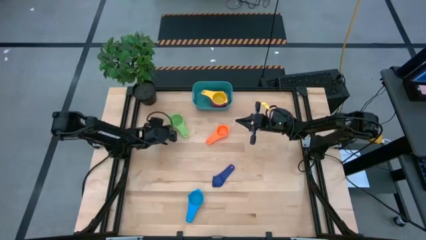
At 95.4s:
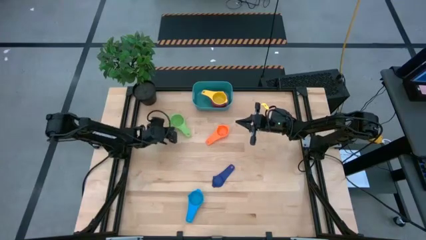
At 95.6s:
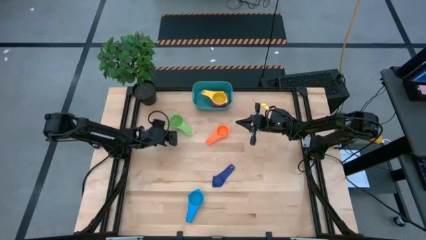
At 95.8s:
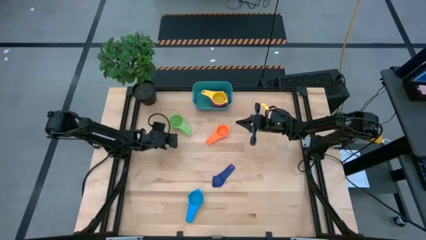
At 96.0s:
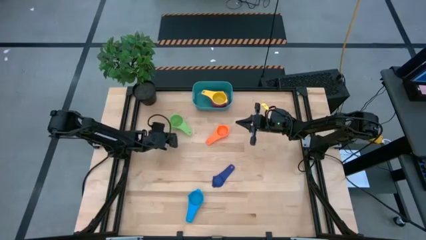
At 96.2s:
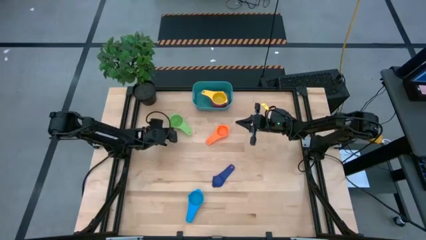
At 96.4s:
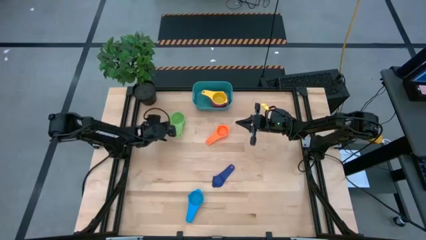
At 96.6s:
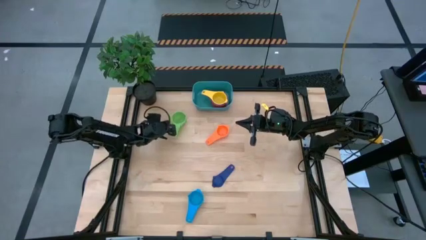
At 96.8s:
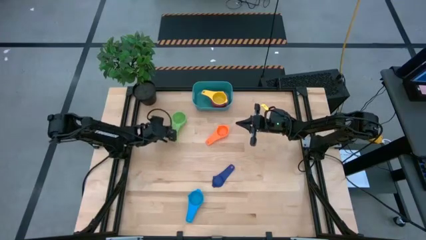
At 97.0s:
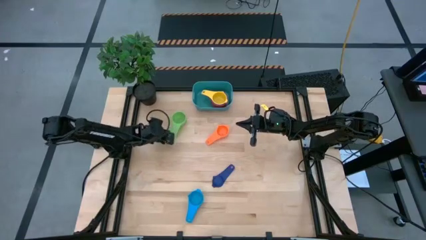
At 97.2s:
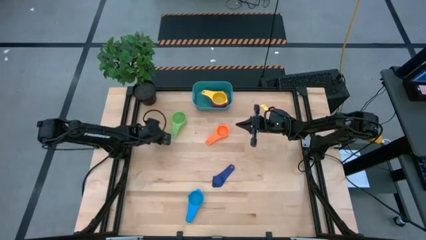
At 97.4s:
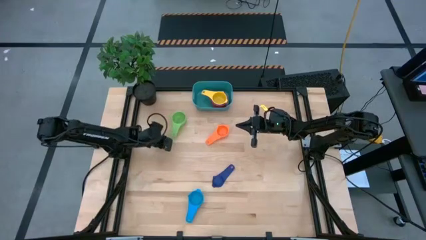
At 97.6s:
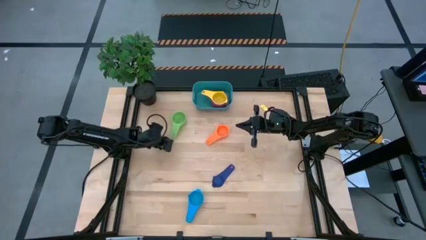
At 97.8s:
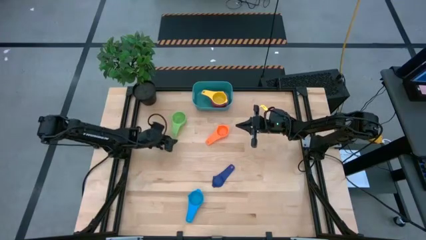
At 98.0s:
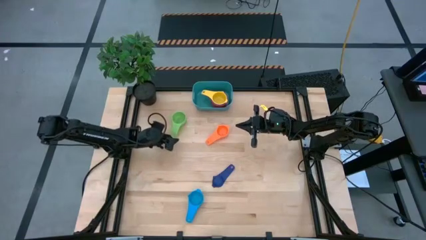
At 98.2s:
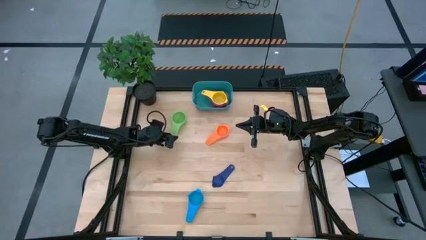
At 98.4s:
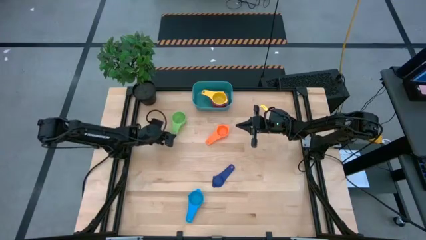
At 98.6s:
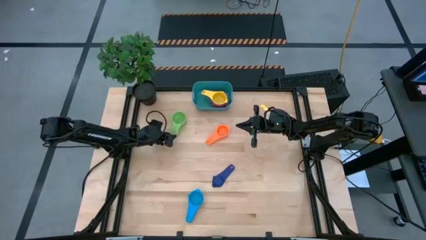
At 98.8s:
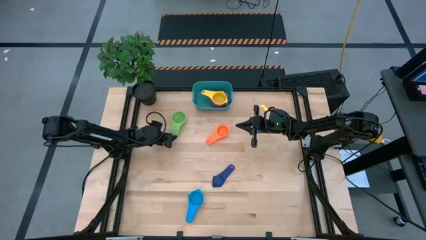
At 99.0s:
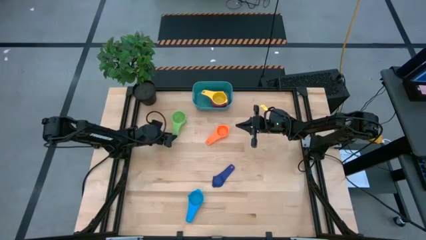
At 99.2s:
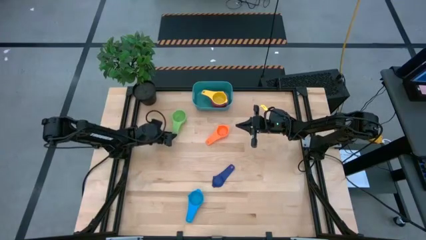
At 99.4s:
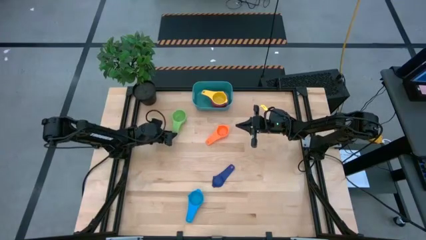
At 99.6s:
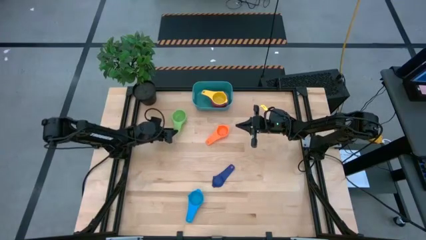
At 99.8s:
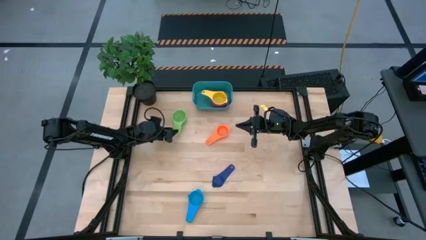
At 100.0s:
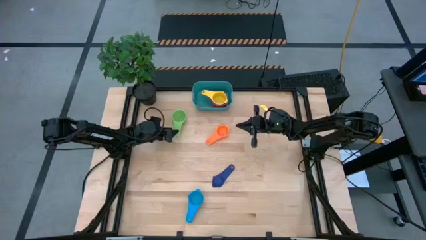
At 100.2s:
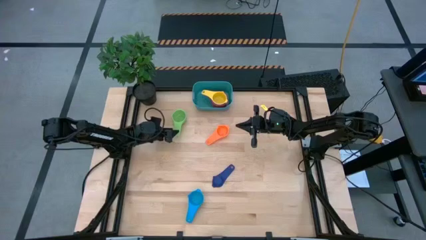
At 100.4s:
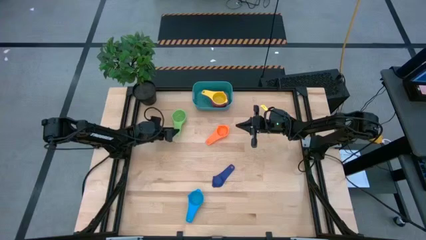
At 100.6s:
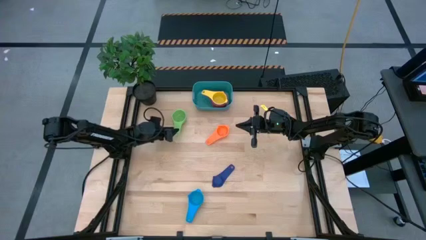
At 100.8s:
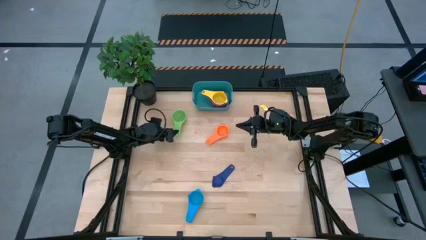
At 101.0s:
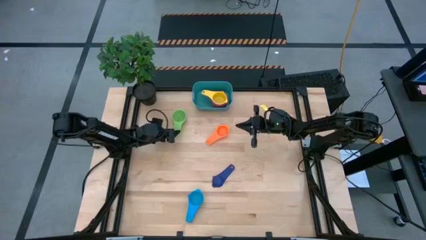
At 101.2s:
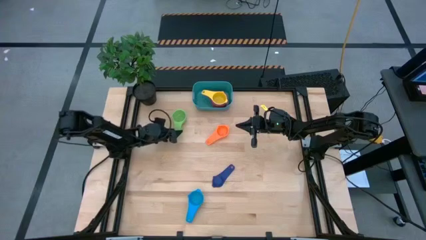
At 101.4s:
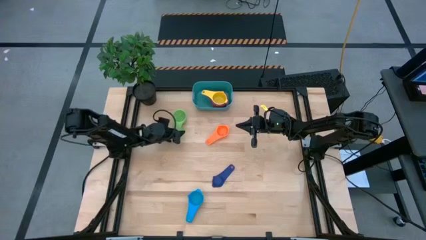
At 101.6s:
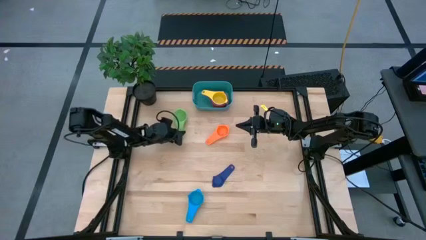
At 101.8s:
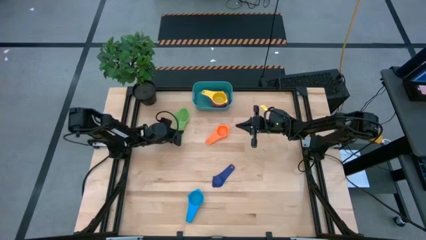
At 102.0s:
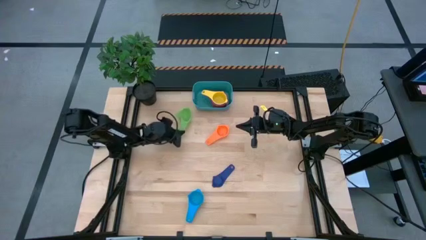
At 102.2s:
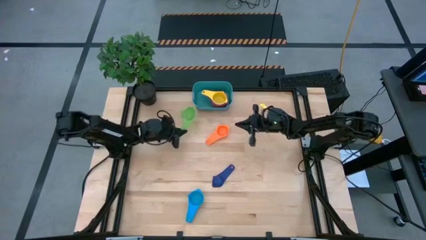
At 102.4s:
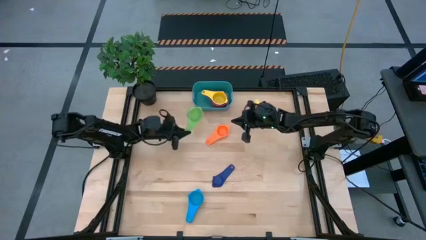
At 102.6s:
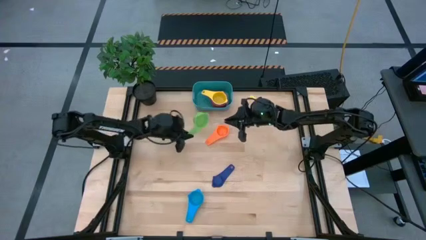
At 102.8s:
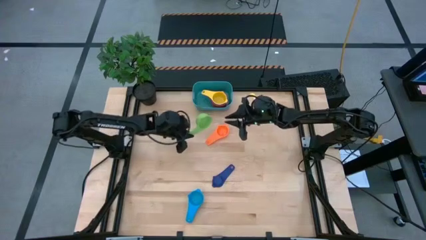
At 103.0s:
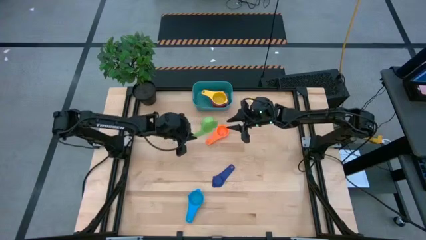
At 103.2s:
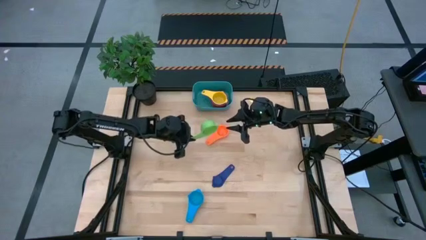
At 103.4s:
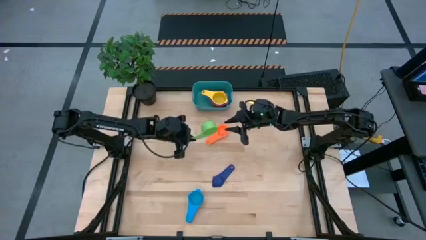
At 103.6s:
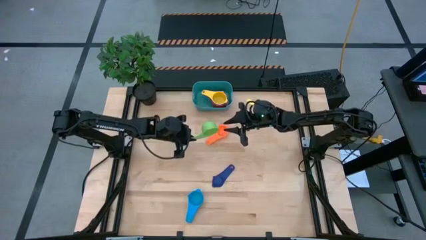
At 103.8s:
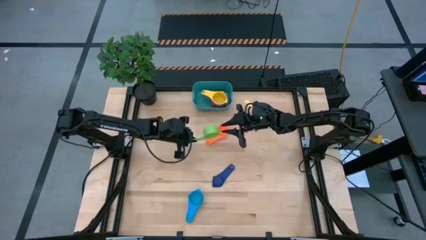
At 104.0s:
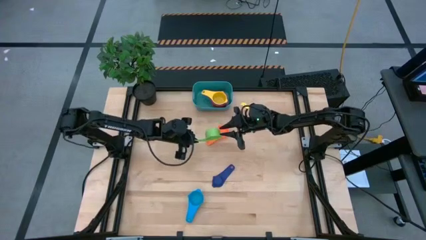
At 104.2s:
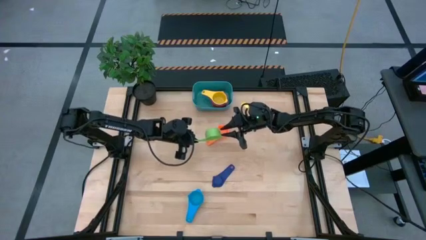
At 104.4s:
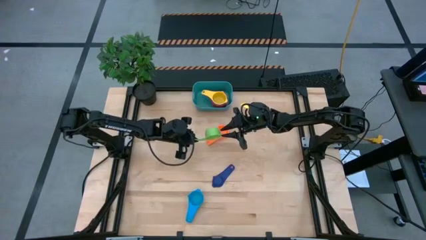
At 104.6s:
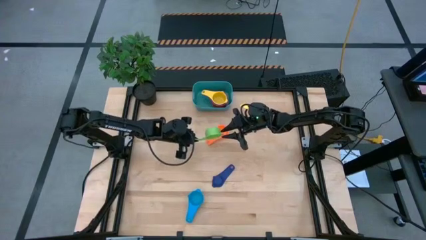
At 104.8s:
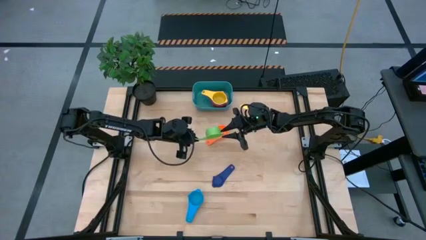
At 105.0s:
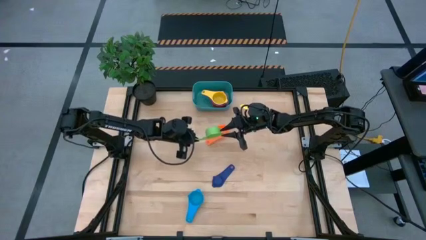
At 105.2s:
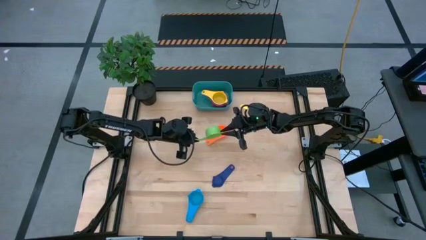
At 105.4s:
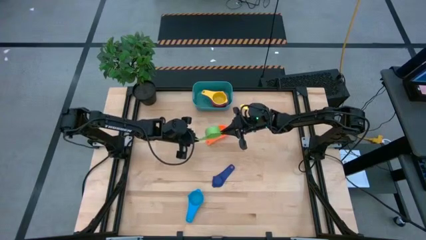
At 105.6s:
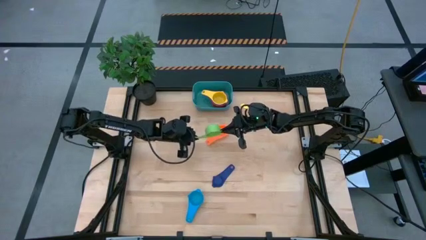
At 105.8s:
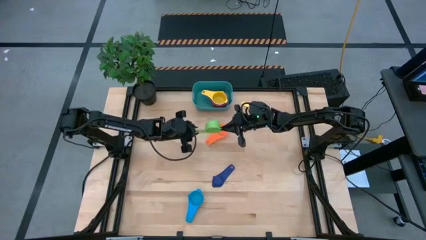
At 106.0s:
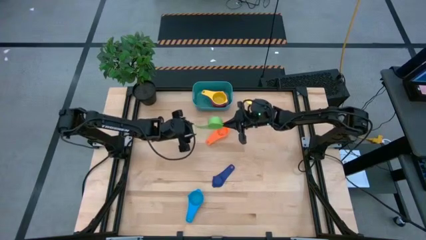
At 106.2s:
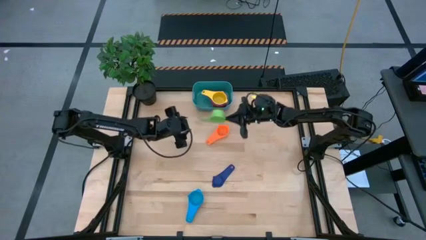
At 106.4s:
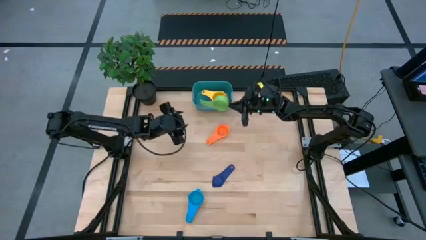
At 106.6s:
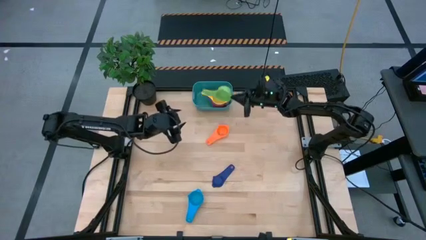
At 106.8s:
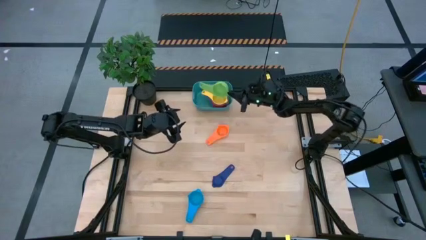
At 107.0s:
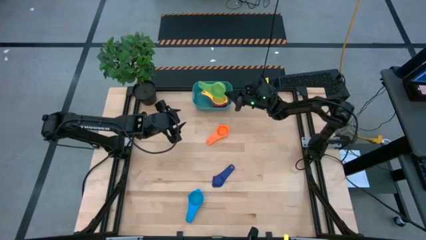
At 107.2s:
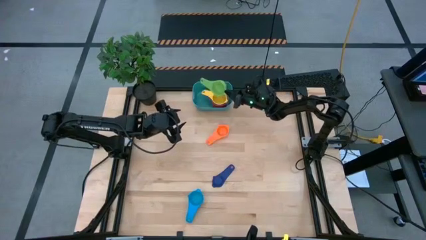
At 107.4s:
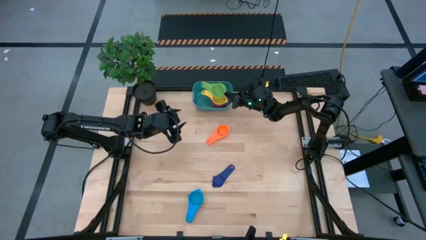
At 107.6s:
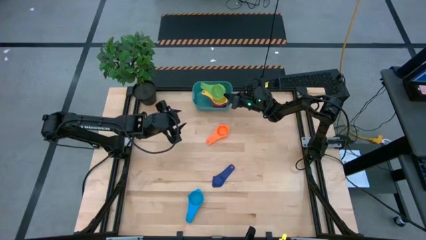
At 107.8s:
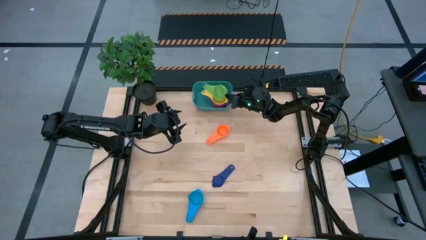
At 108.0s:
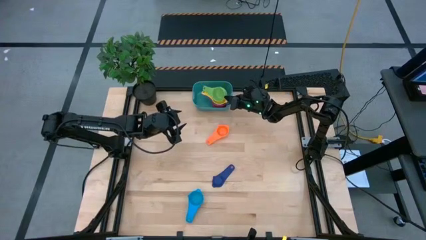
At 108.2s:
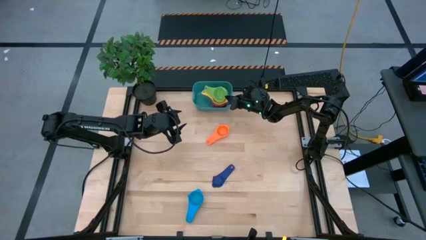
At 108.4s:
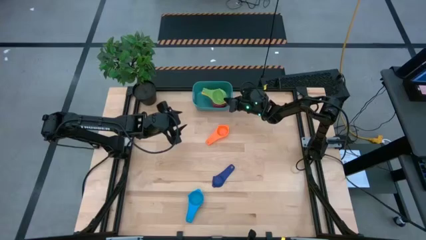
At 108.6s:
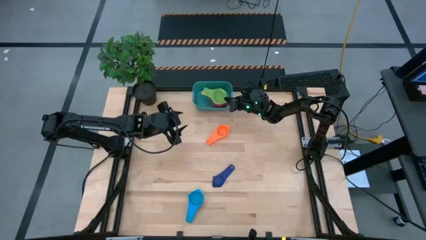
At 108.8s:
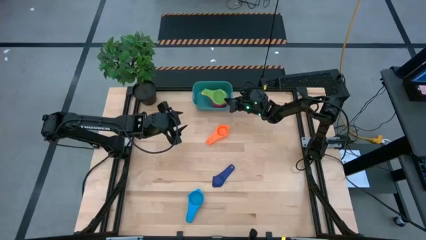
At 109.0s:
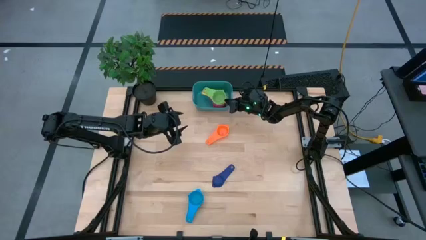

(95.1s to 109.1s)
Task: Nest measuring cups in basket
Stack the green measuring cup on top of the yellow measuring cup in the blue bin
